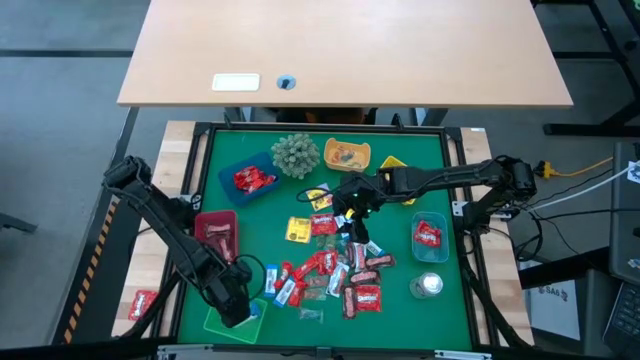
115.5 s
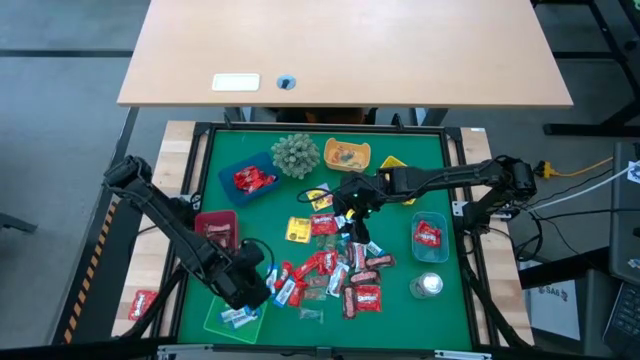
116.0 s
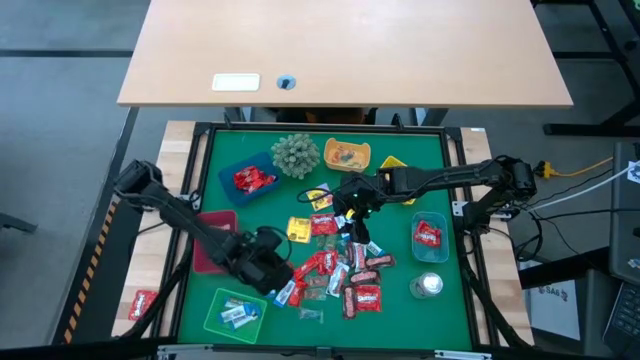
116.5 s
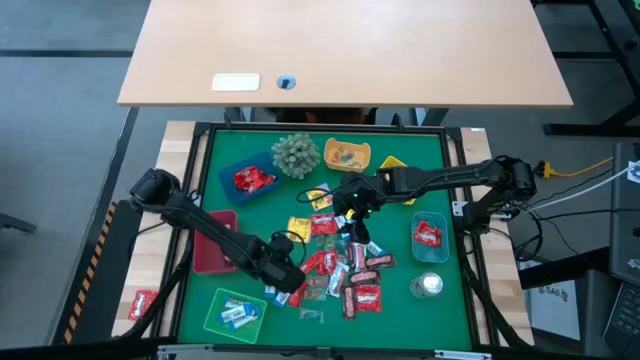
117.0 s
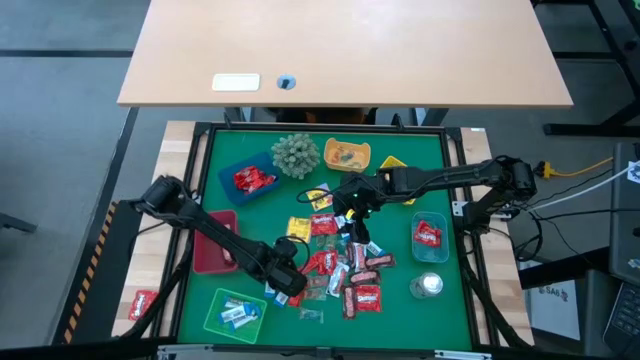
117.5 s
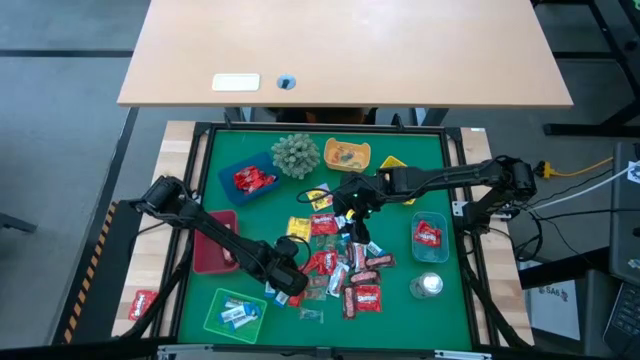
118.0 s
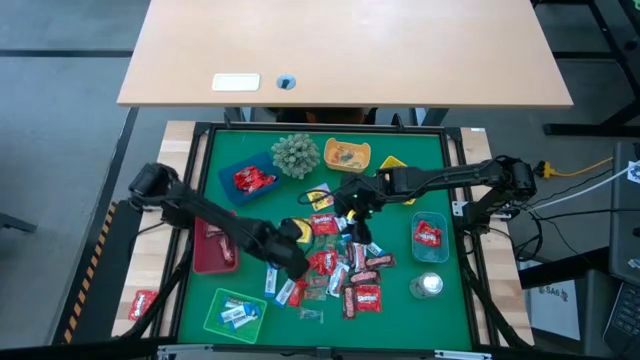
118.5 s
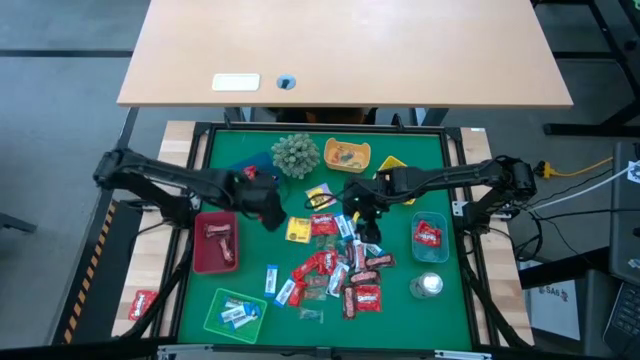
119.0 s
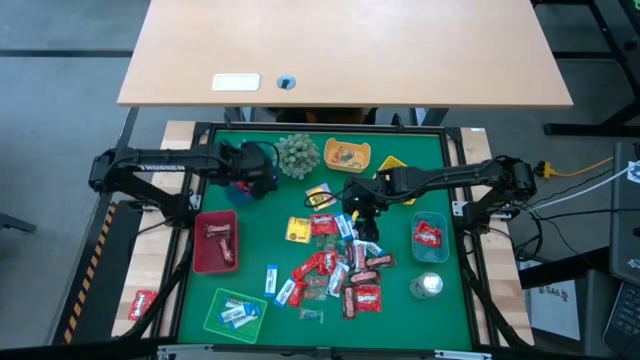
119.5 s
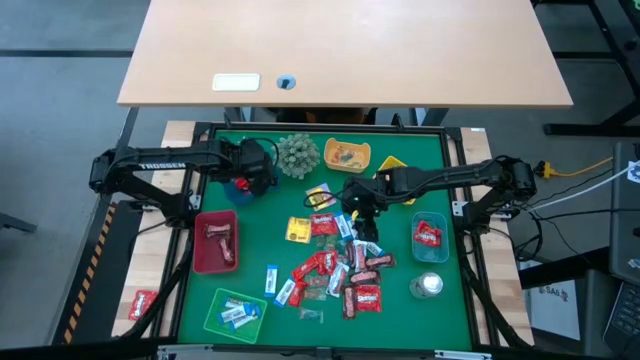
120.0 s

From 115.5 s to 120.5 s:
Task: Sort candy
Put the red chocolate into the blue bin

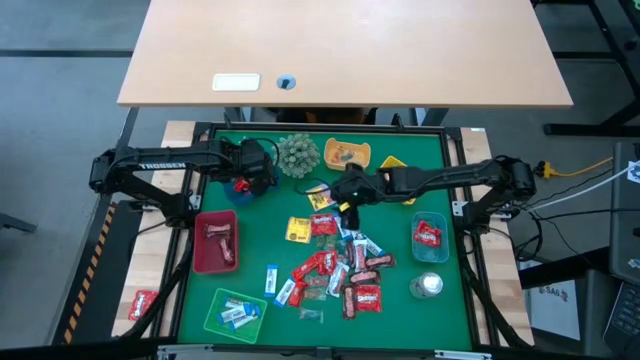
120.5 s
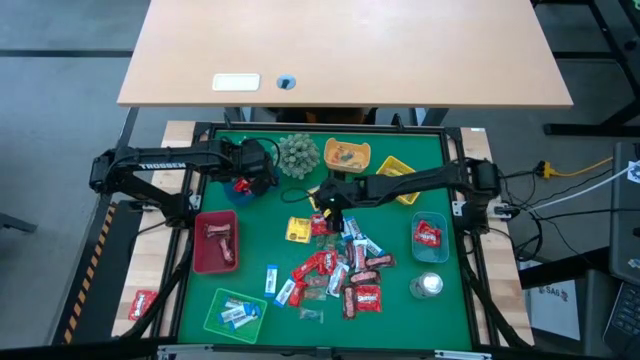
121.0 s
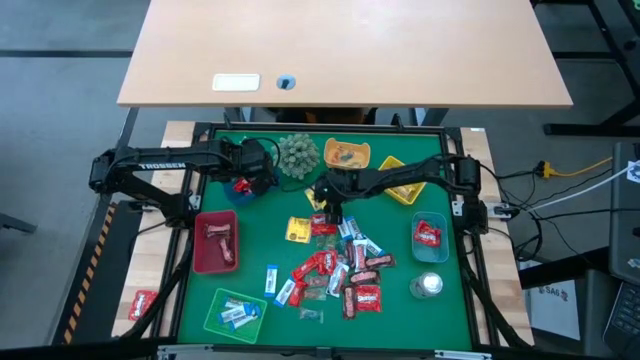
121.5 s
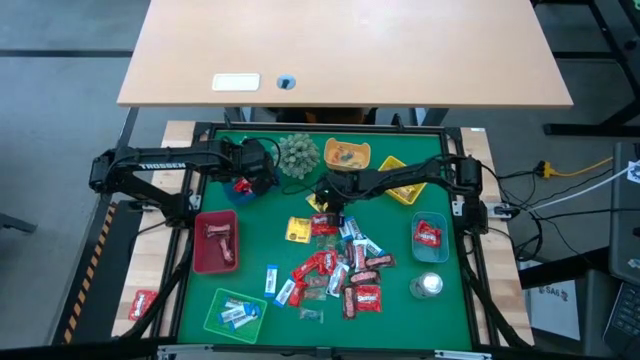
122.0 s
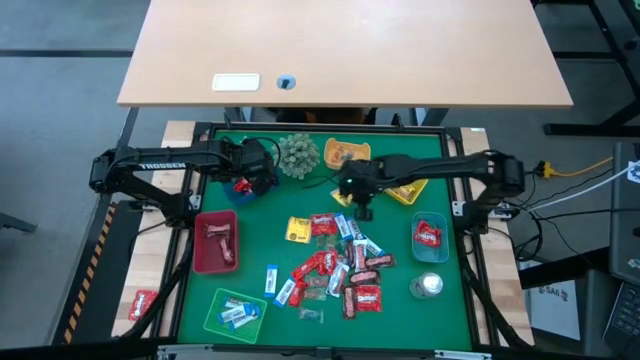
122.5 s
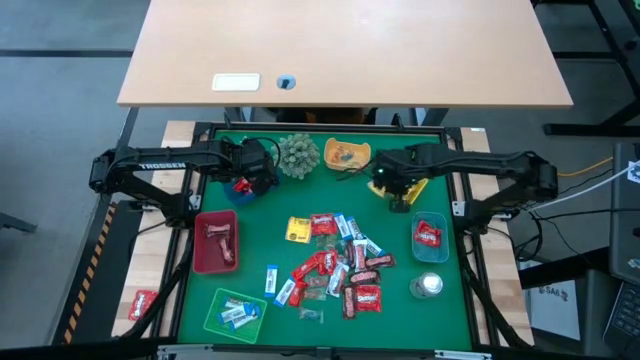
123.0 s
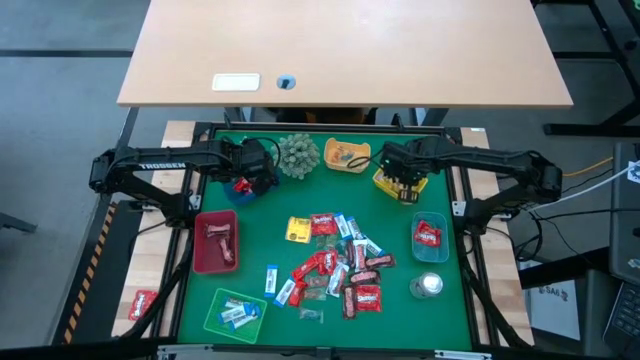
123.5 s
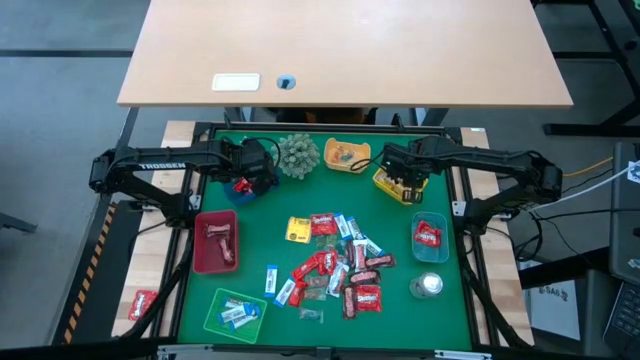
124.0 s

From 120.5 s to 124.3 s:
Put the yellow candy into the yellow bin

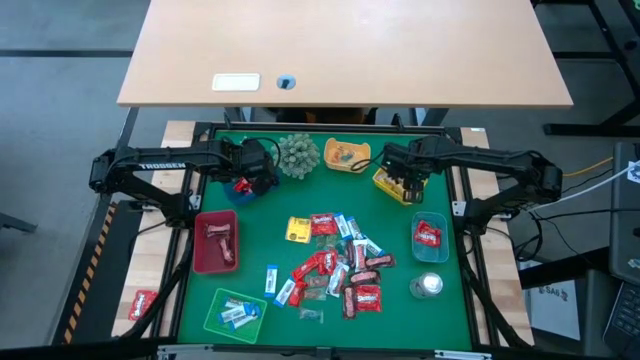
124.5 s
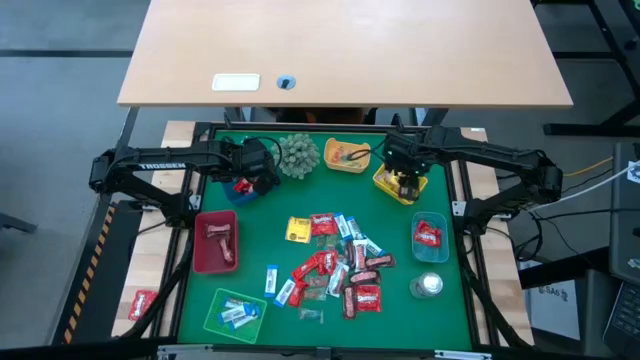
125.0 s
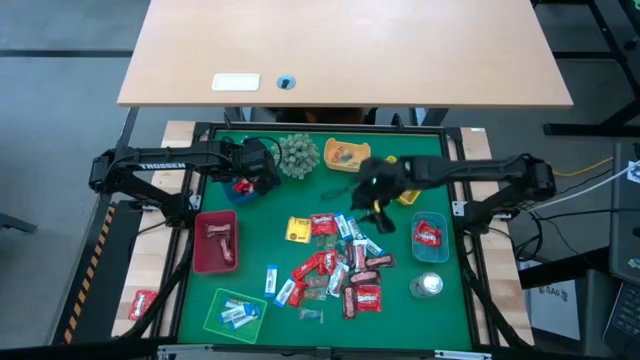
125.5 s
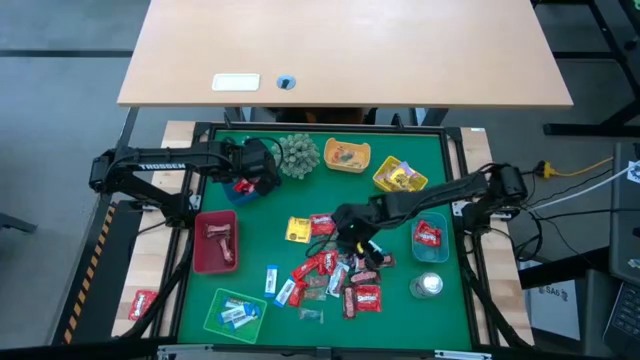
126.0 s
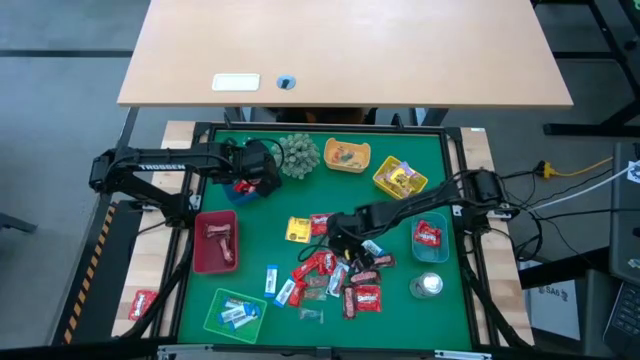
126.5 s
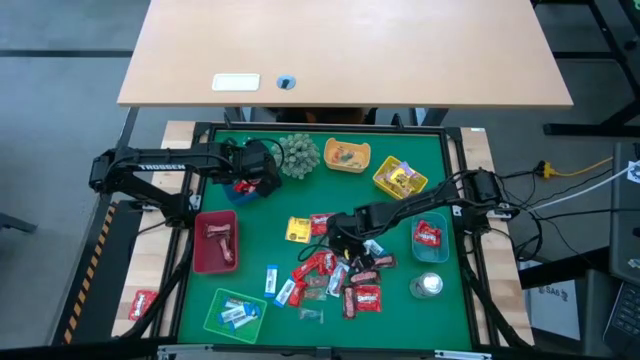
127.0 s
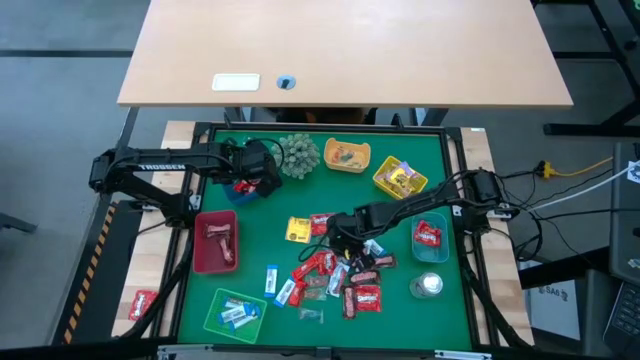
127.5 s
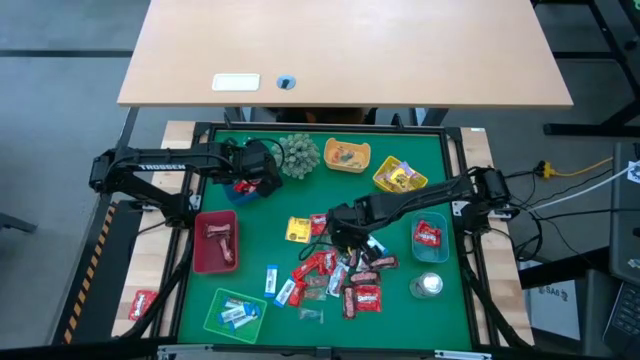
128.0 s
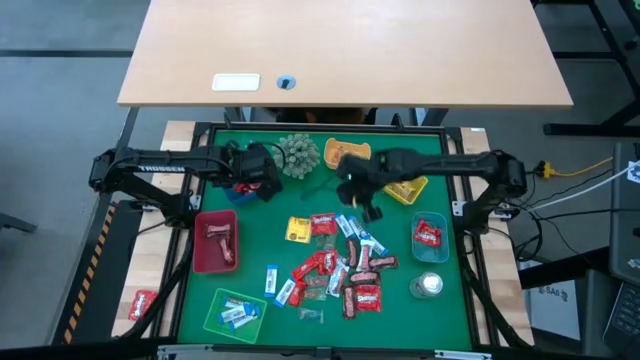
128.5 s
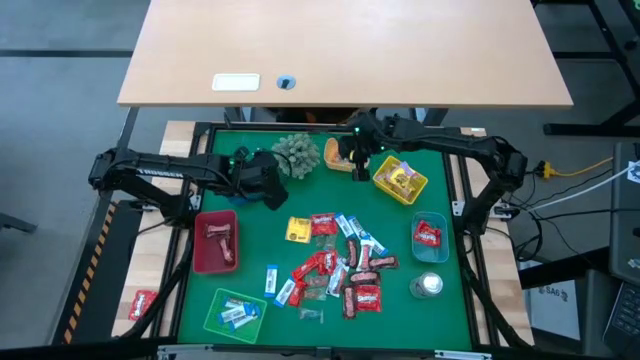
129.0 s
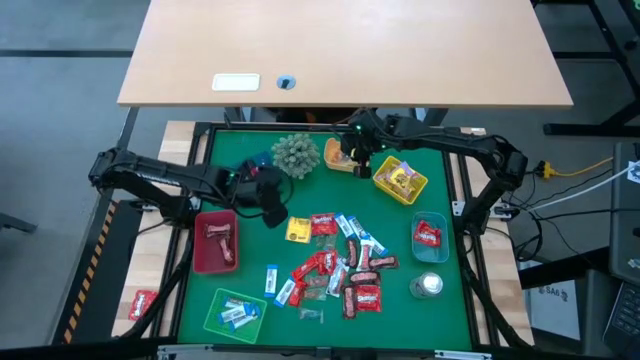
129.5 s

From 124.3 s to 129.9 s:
Put the blue gummy into the orange bin

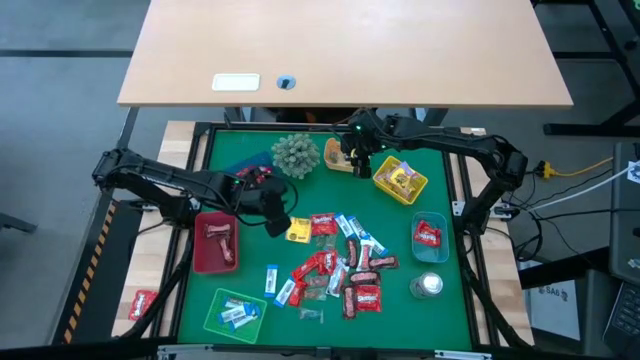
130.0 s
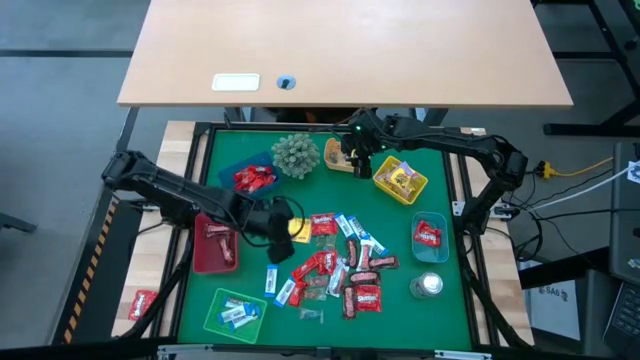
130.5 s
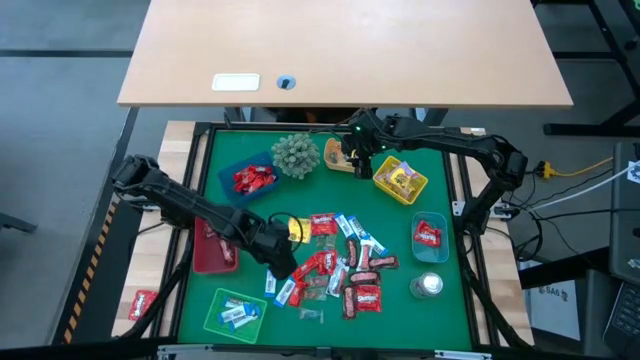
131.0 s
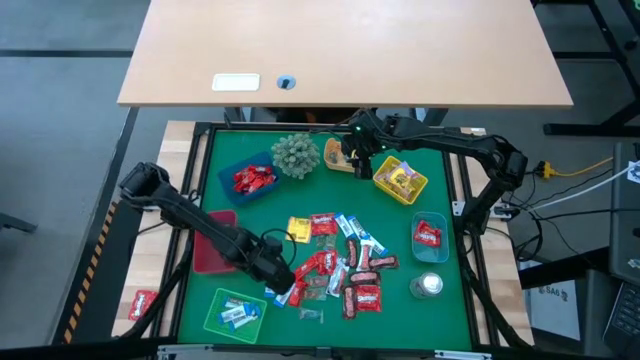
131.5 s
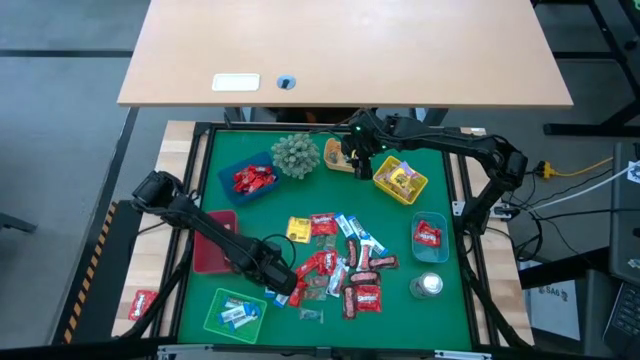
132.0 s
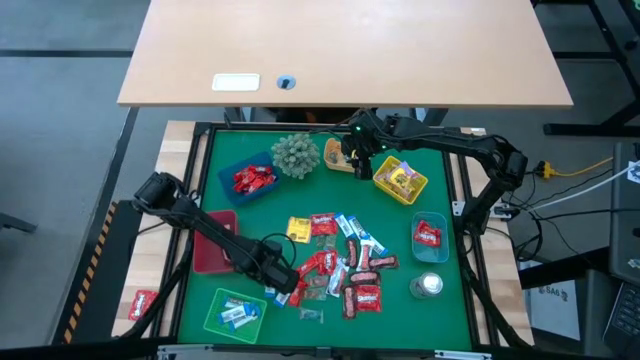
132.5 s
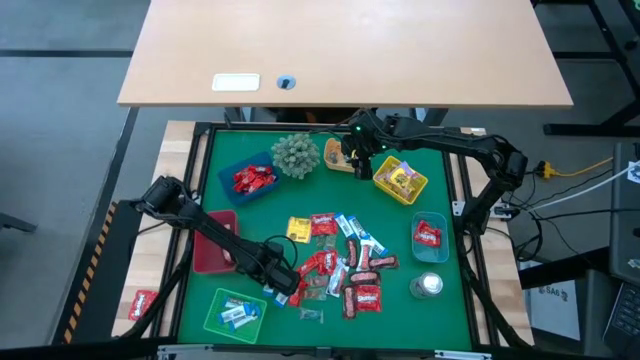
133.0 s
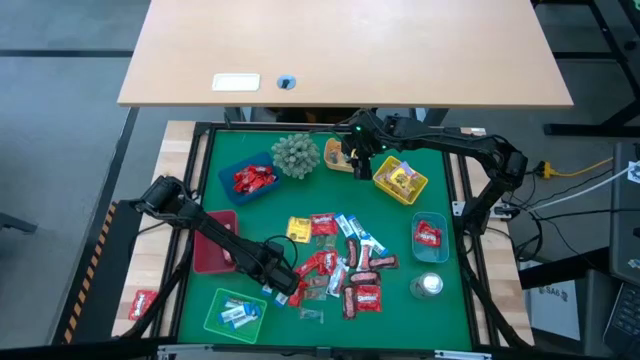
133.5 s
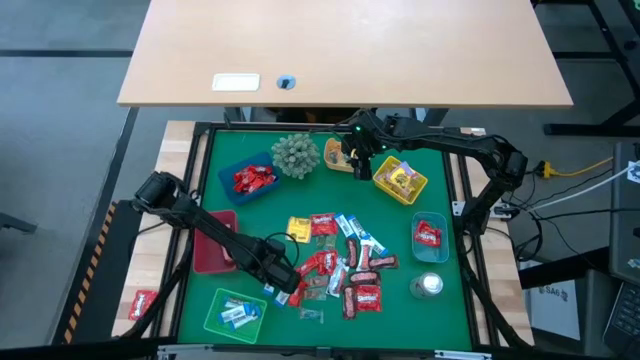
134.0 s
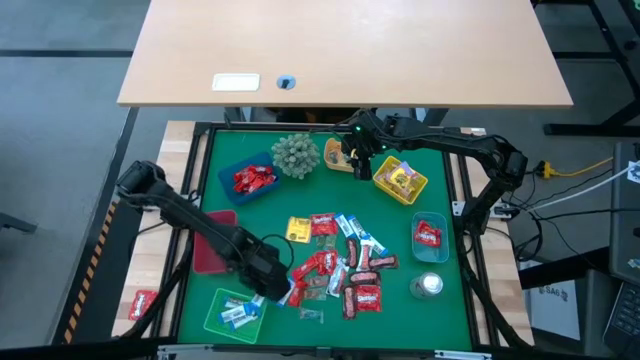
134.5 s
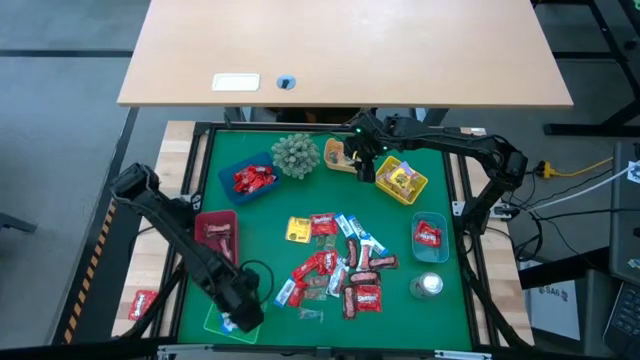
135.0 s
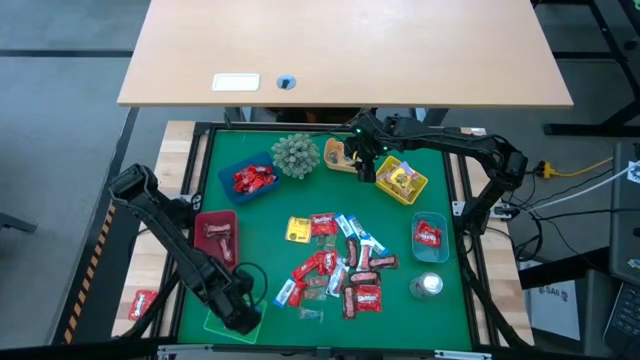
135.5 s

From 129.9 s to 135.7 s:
Put the white-blue chocolate into the green bin
